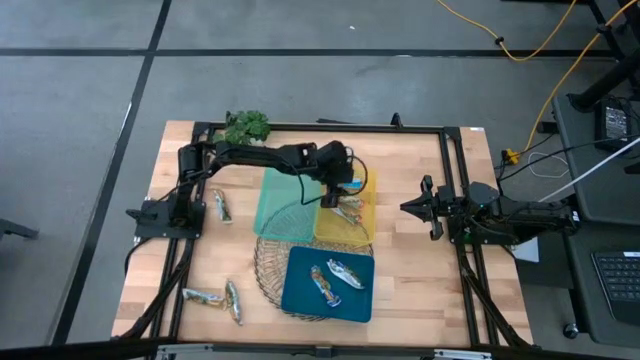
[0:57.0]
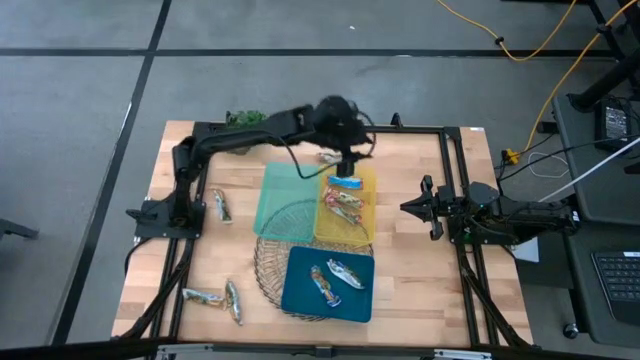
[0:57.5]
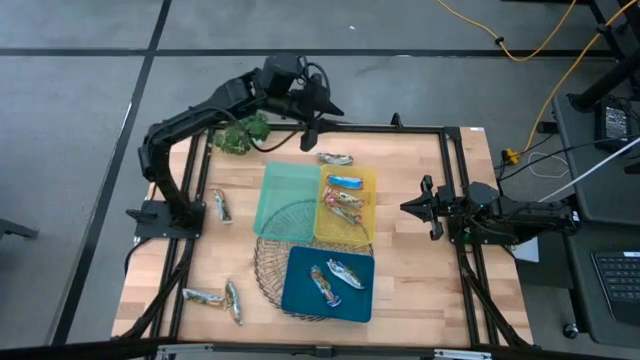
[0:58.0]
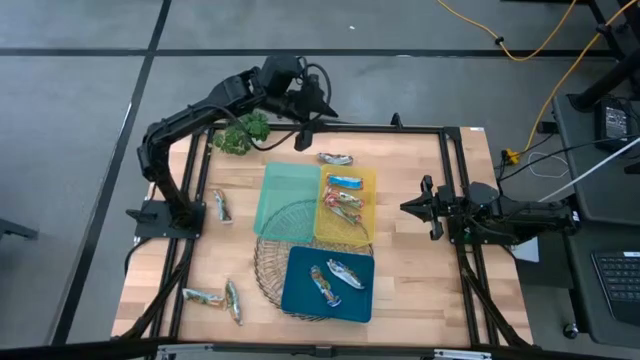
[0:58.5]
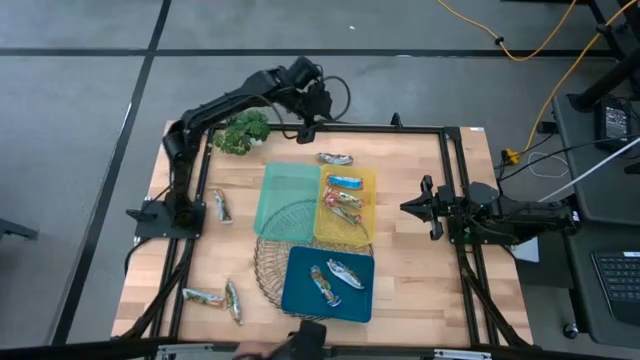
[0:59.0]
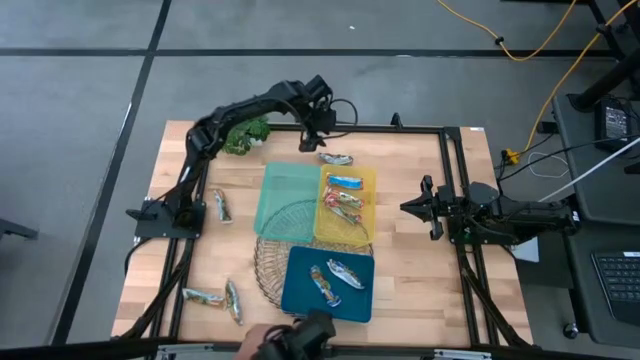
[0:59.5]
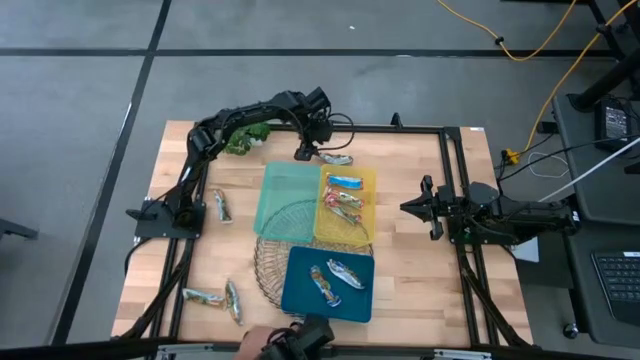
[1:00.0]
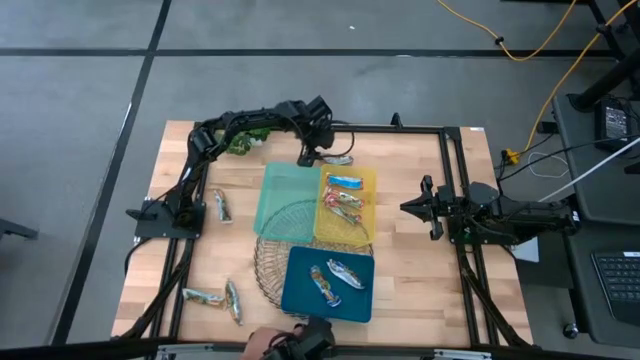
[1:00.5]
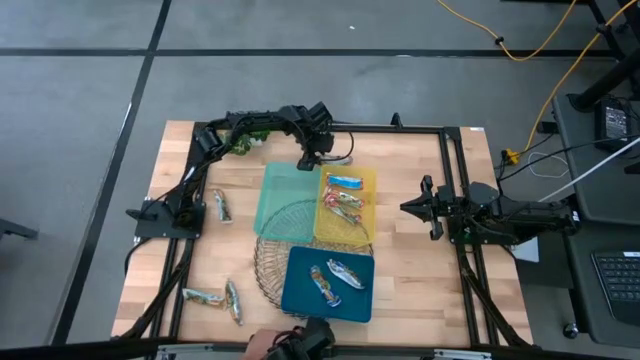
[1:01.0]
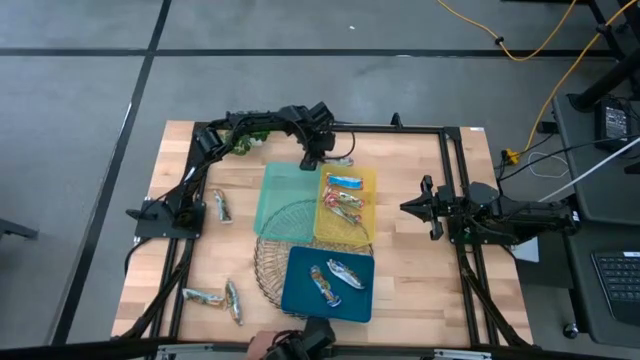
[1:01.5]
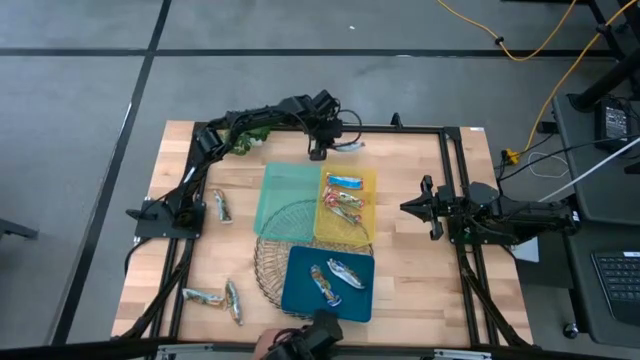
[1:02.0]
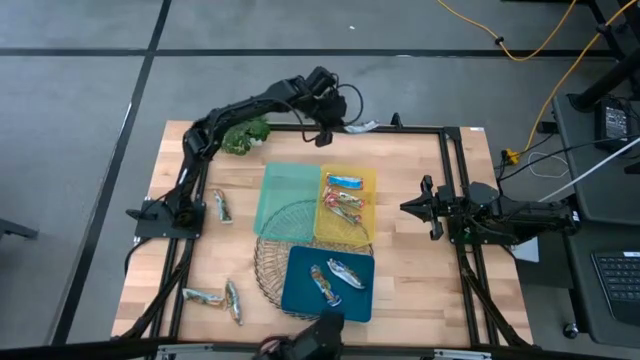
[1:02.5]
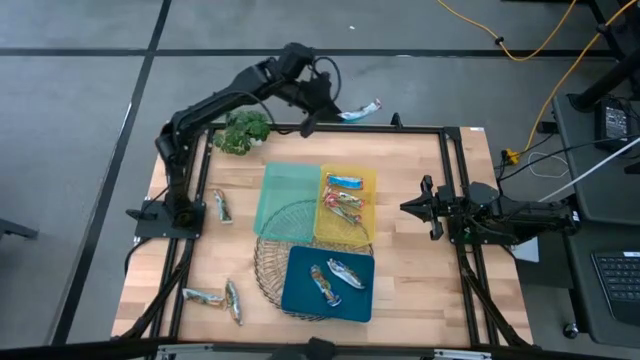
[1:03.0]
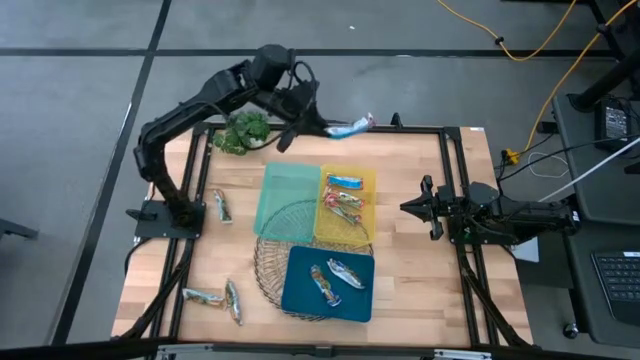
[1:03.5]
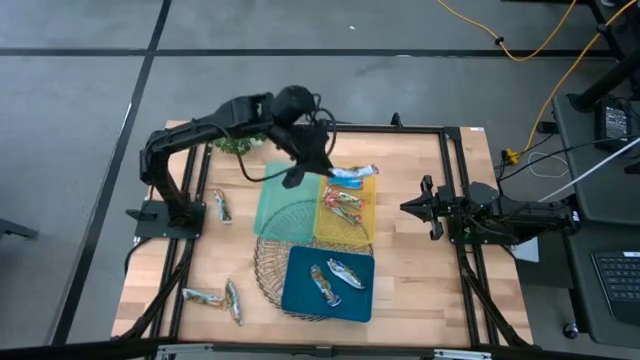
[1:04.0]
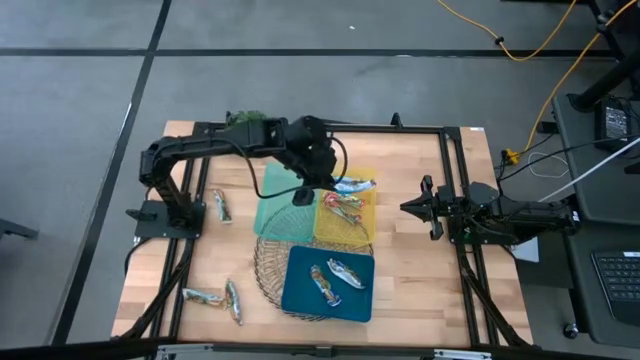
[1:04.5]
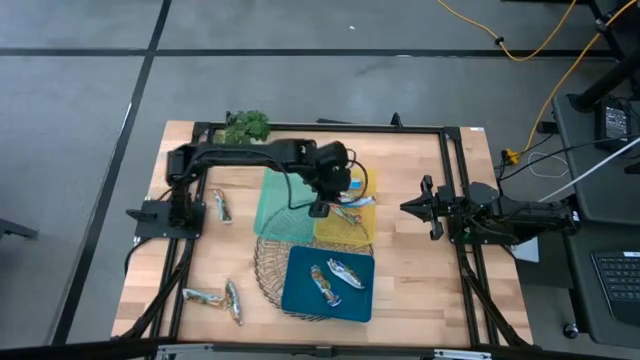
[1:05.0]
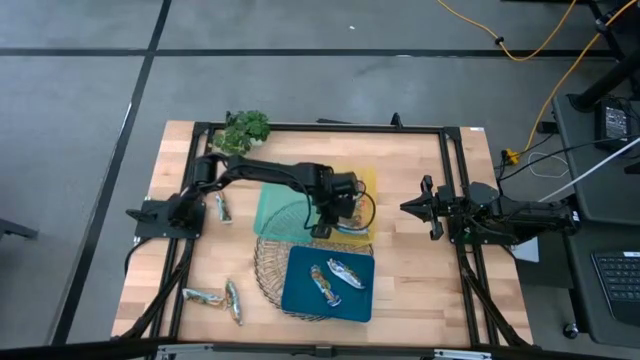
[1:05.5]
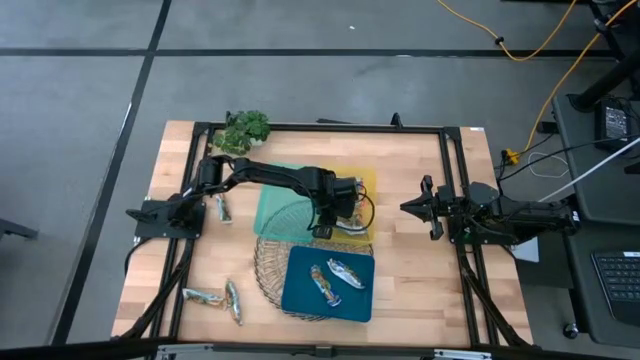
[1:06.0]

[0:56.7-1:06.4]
Task: Pick and place Granola Bars by type
Put the red granola bar into the yellow bin

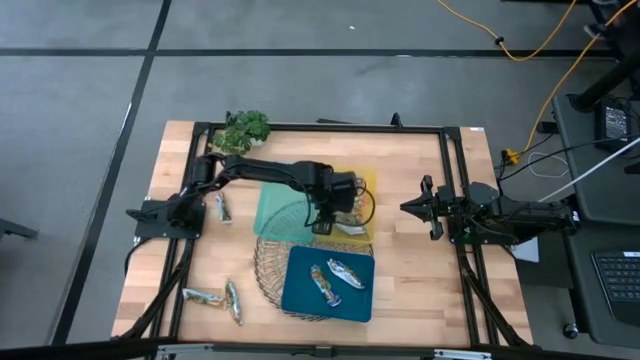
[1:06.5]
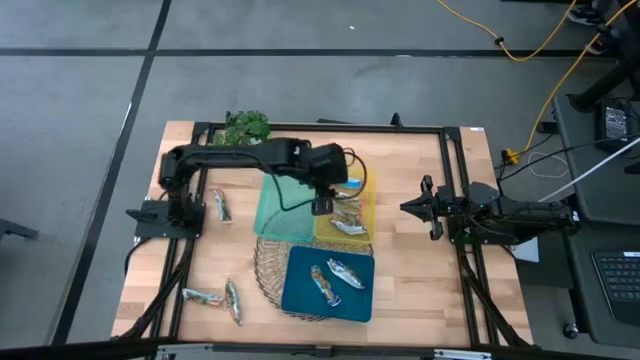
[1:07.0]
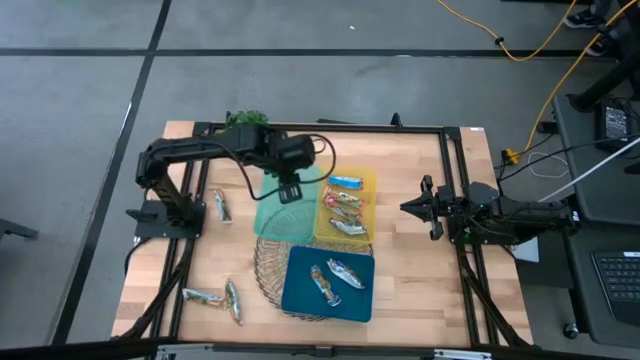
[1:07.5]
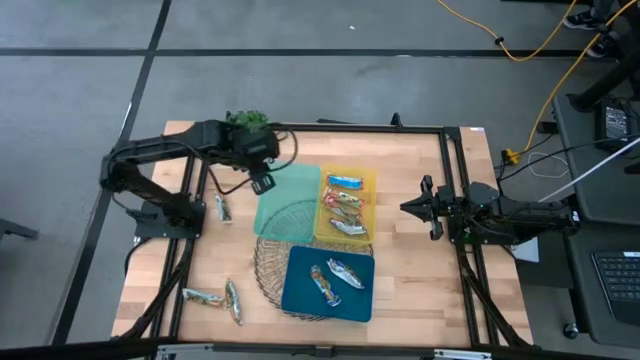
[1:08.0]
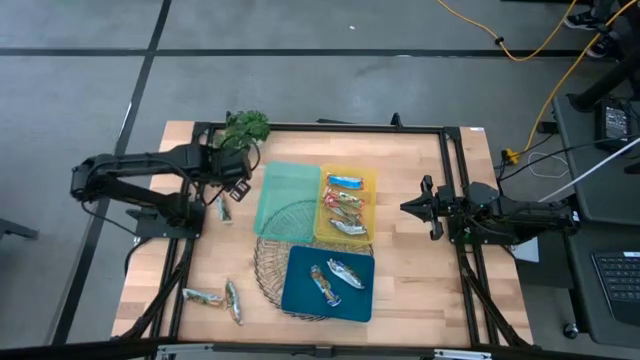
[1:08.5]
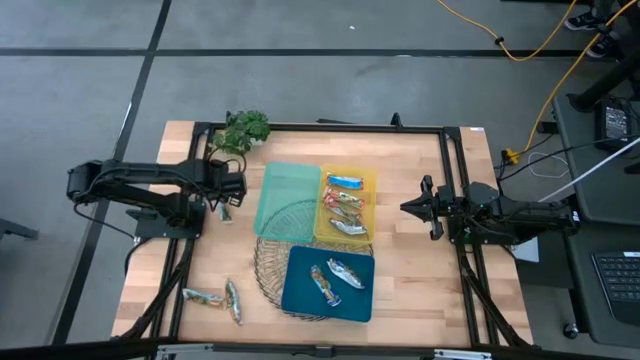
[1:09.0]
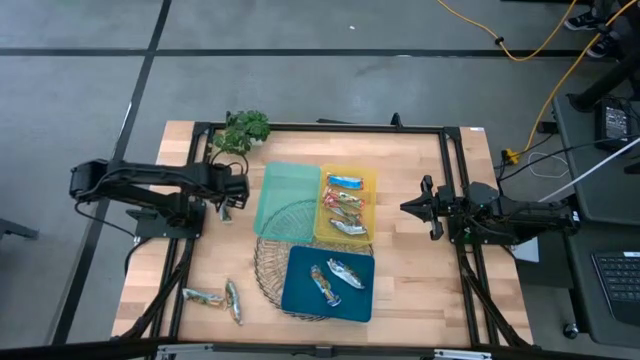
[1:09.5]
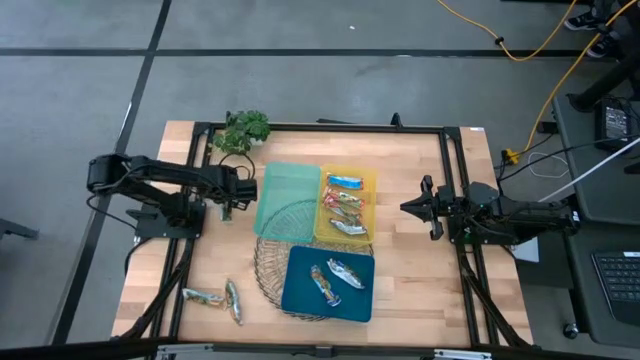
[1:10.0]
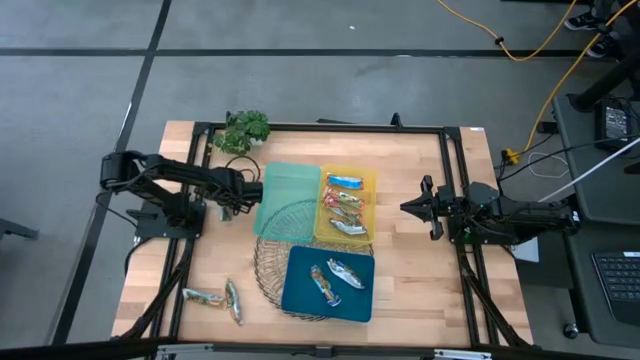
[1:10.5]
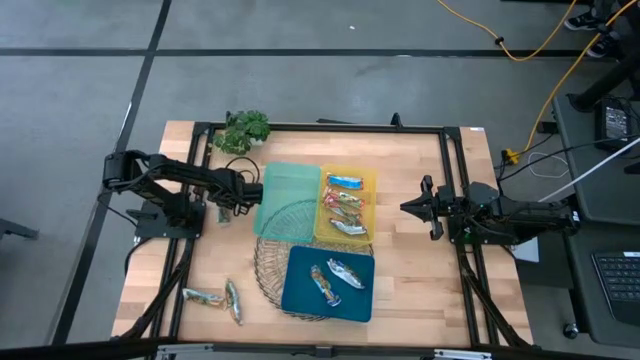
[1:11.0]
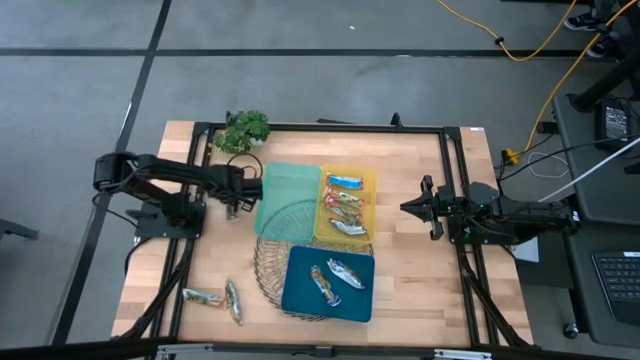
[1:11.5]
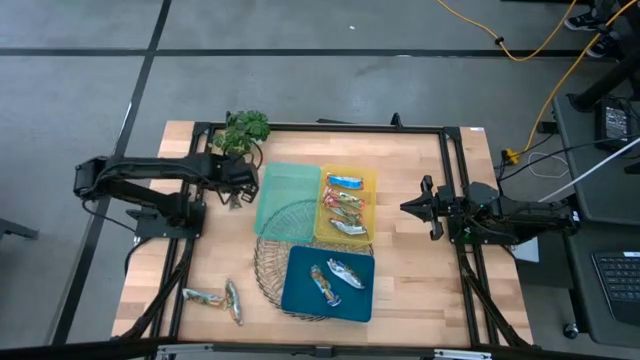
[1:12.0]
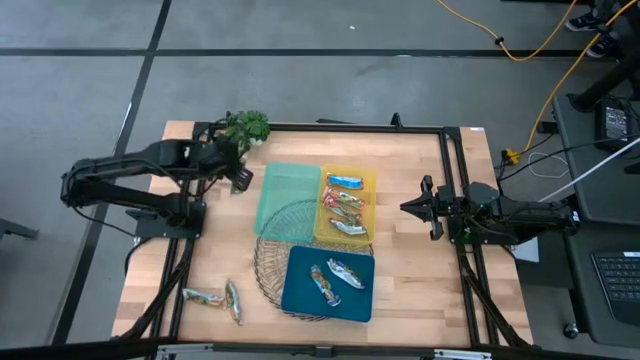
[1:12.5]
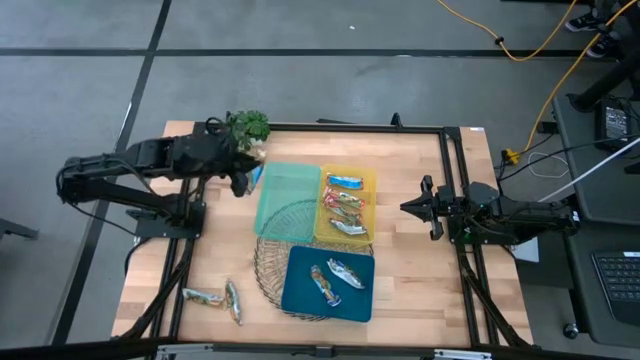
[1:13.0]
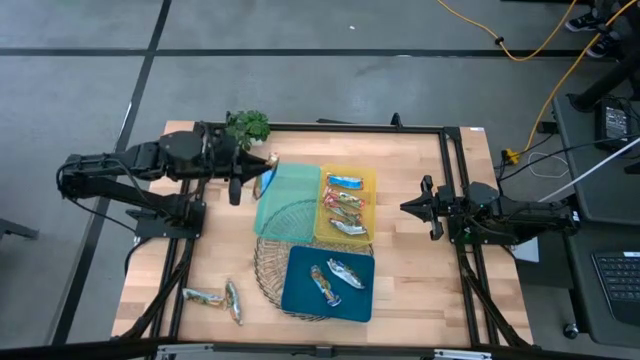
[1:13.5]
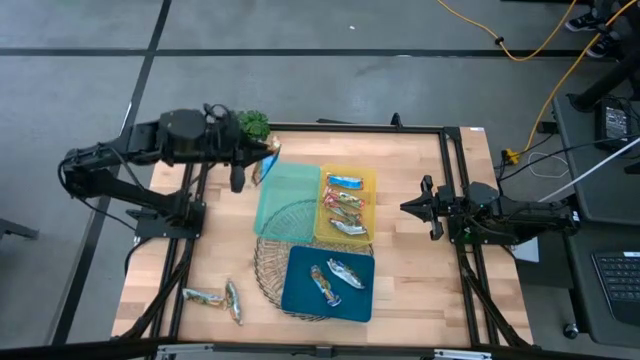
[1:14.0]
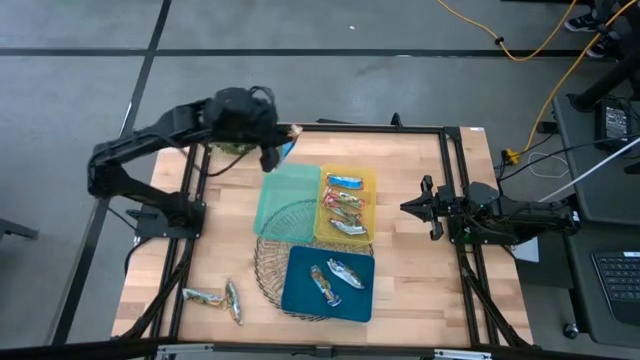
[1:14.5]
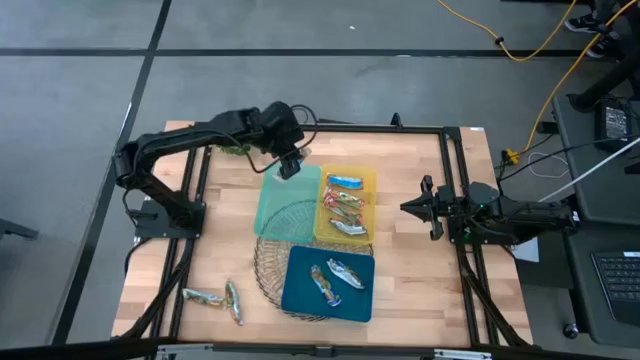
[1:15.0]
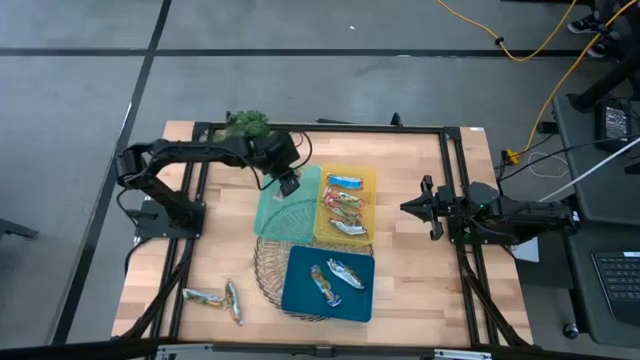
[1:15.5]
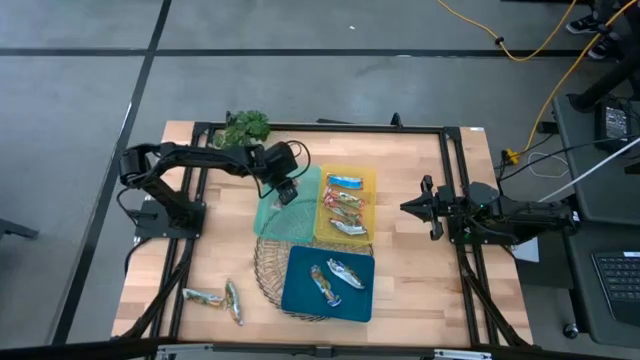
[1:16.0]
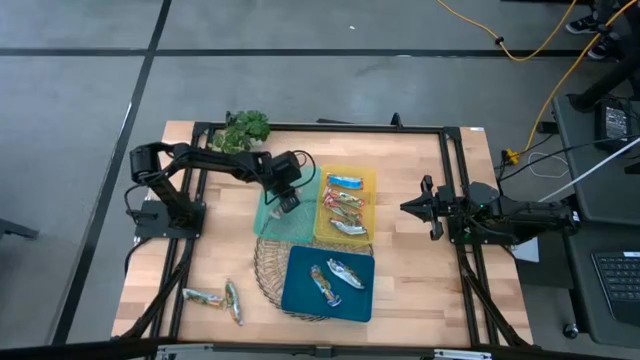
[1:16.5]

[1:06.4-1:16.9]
Put the yellow granola bar into the green bin
